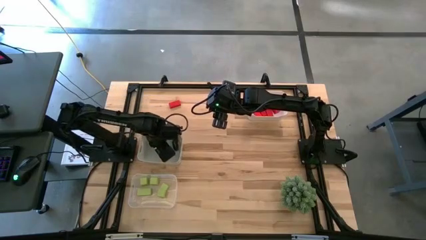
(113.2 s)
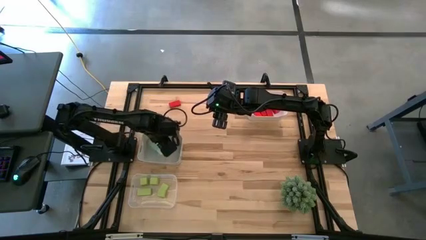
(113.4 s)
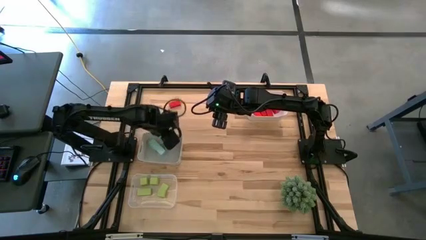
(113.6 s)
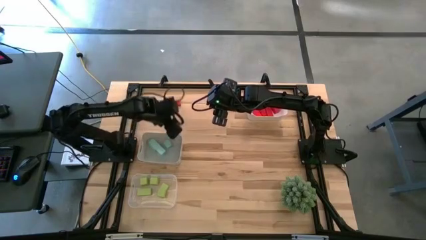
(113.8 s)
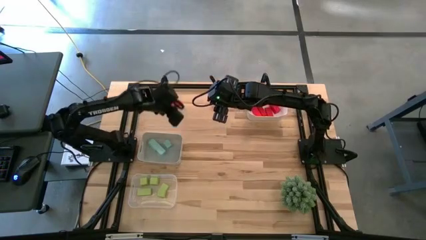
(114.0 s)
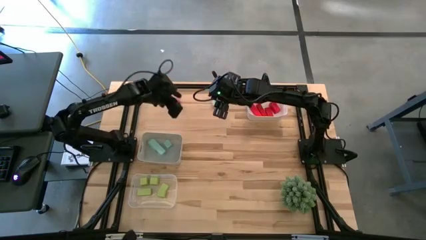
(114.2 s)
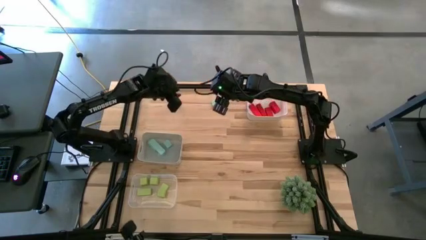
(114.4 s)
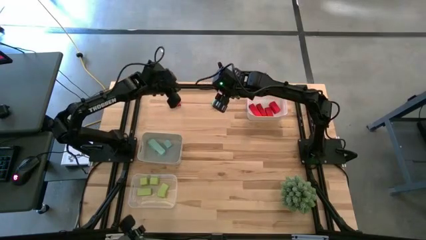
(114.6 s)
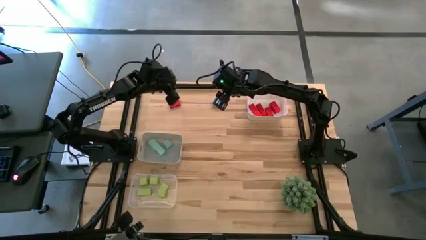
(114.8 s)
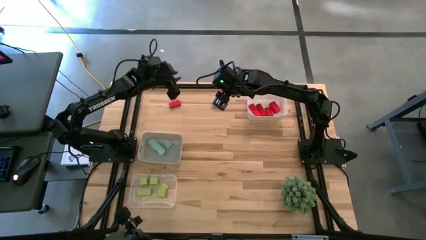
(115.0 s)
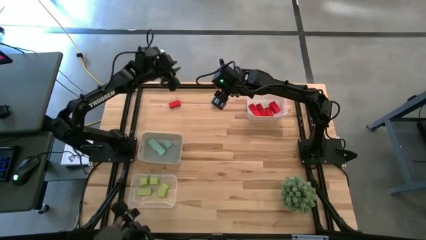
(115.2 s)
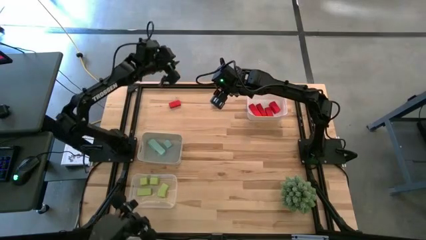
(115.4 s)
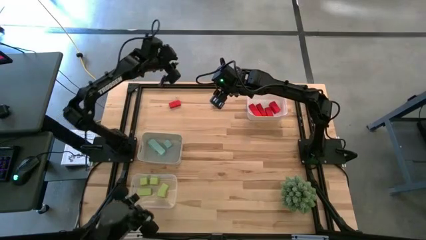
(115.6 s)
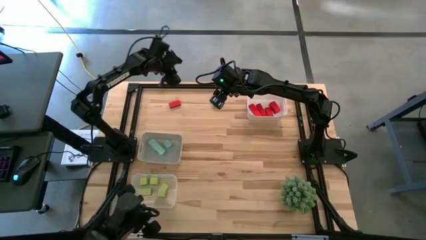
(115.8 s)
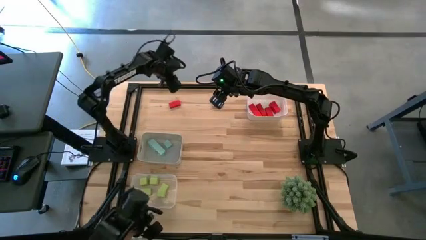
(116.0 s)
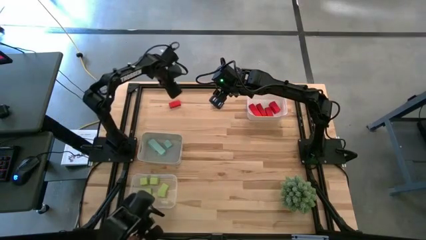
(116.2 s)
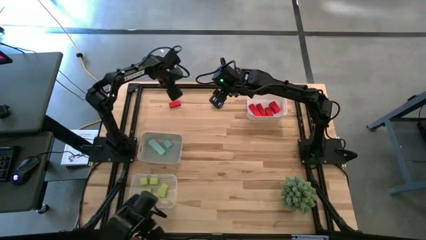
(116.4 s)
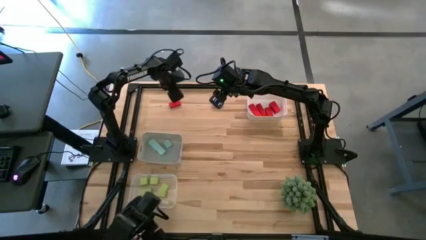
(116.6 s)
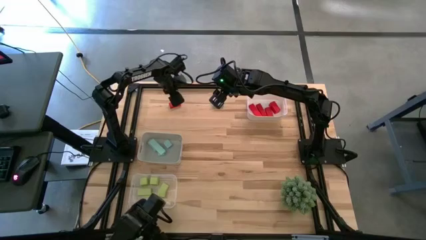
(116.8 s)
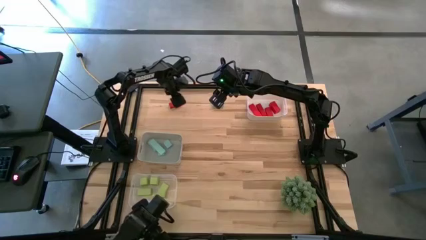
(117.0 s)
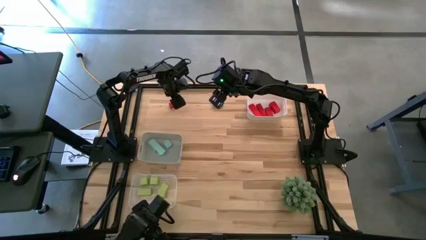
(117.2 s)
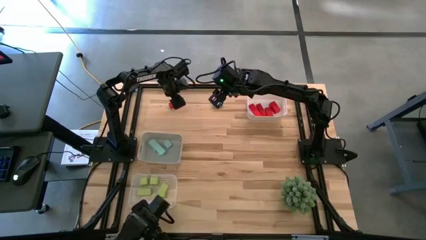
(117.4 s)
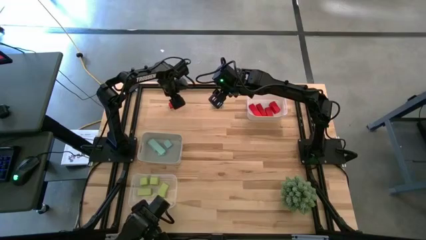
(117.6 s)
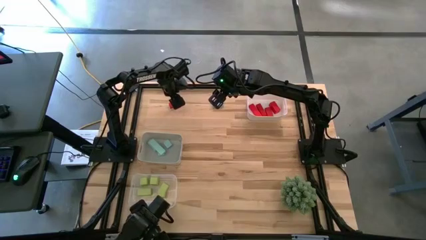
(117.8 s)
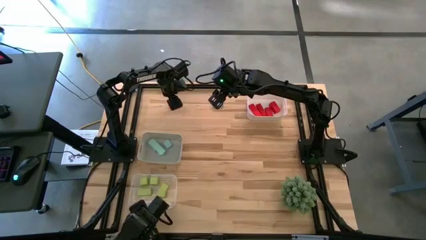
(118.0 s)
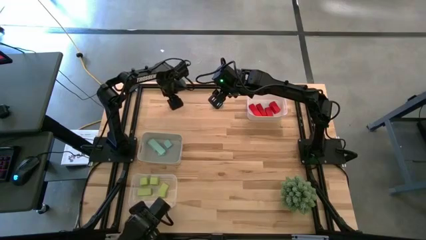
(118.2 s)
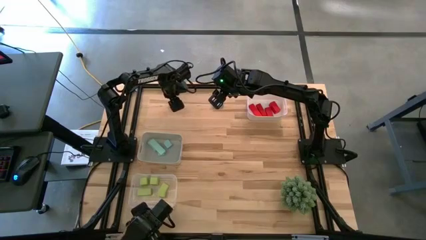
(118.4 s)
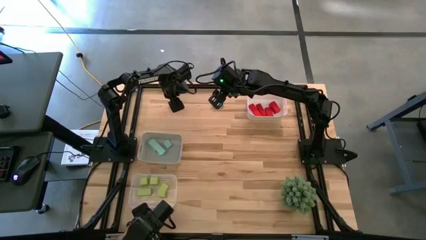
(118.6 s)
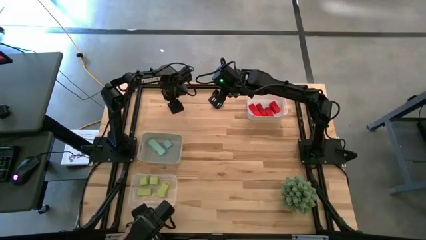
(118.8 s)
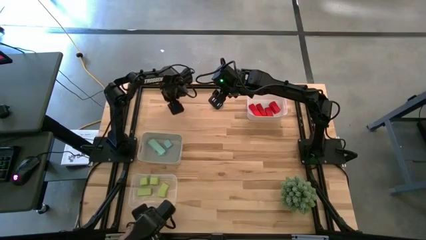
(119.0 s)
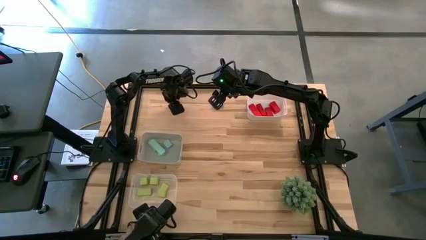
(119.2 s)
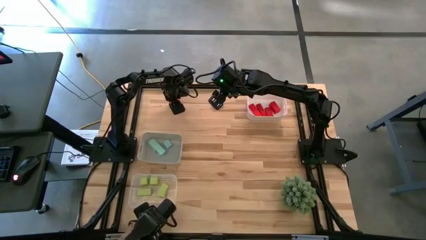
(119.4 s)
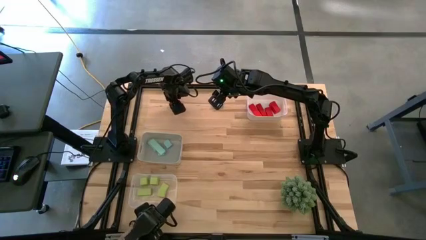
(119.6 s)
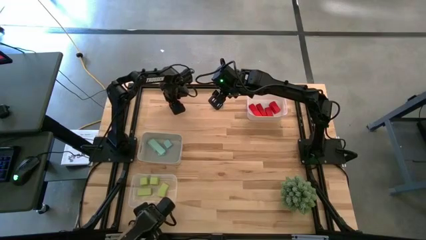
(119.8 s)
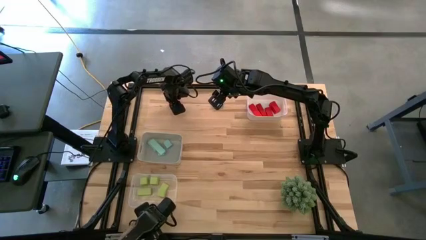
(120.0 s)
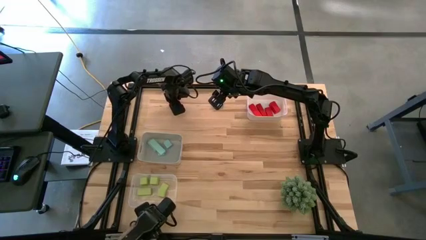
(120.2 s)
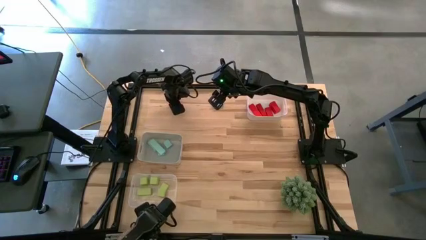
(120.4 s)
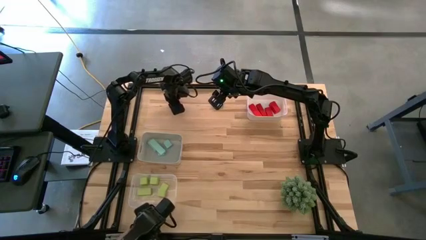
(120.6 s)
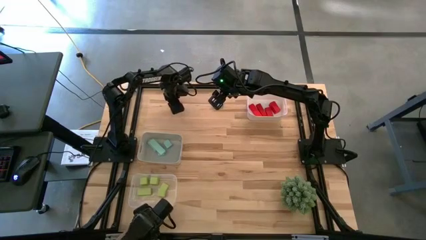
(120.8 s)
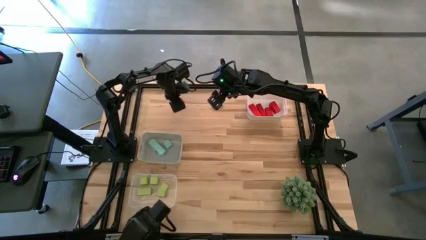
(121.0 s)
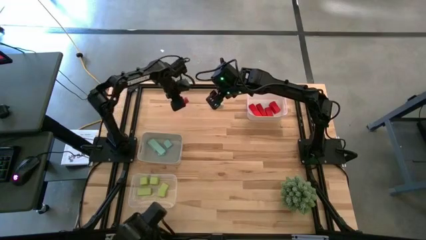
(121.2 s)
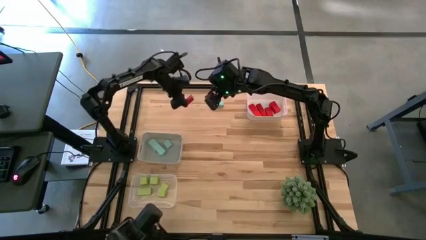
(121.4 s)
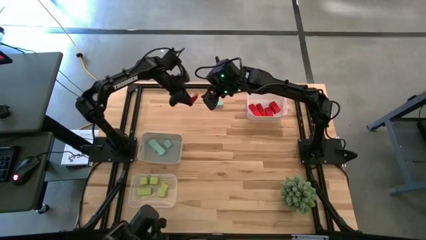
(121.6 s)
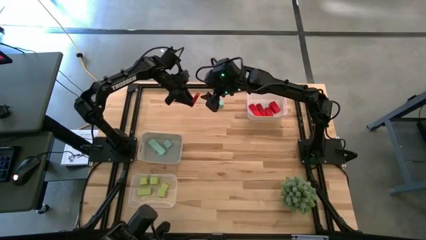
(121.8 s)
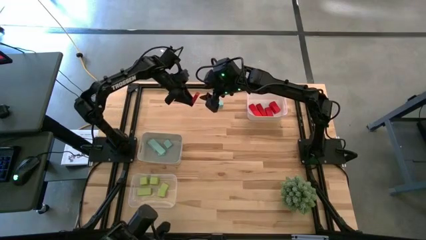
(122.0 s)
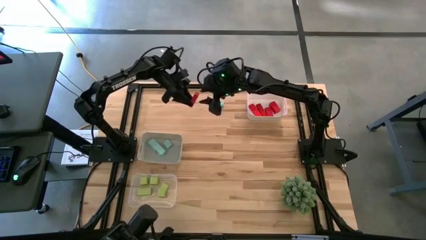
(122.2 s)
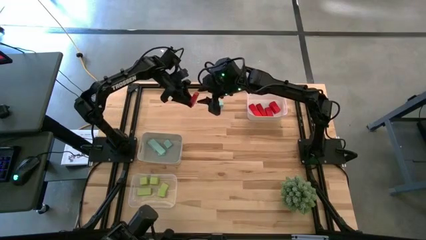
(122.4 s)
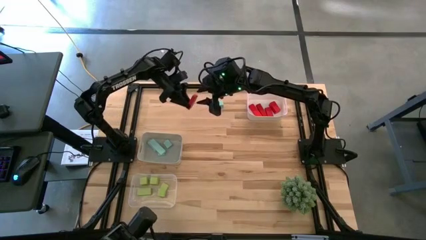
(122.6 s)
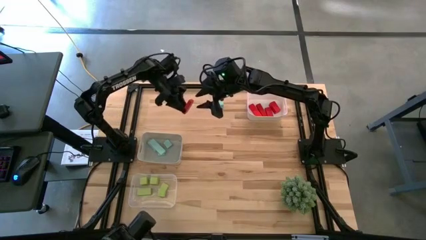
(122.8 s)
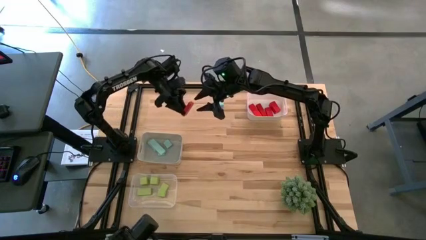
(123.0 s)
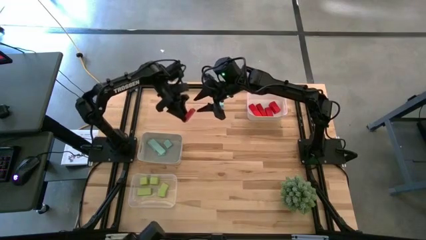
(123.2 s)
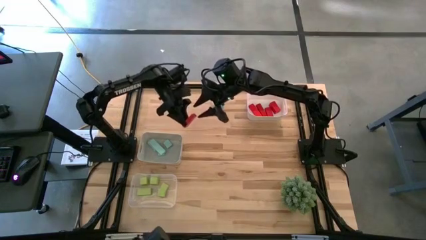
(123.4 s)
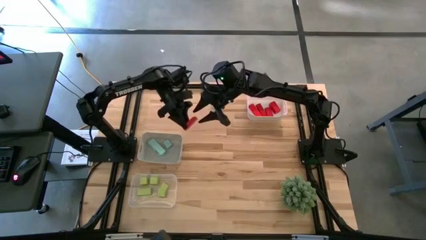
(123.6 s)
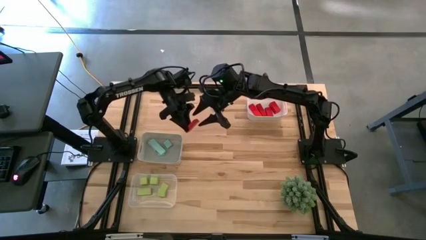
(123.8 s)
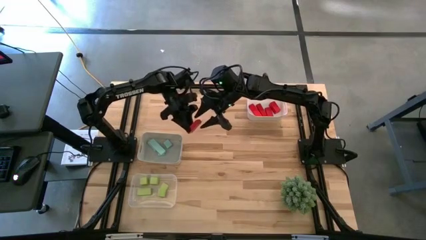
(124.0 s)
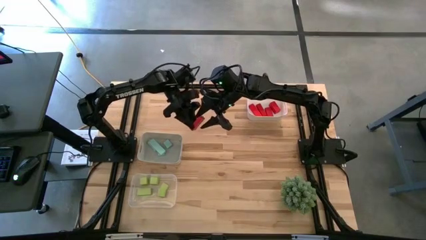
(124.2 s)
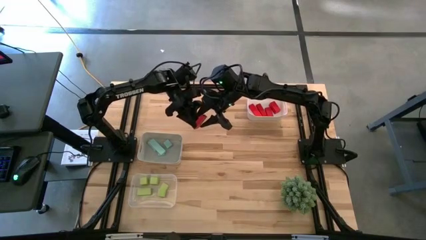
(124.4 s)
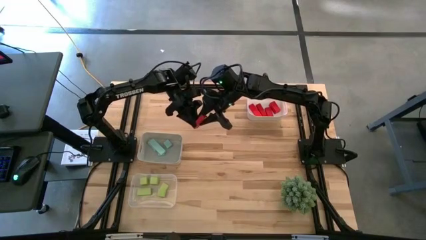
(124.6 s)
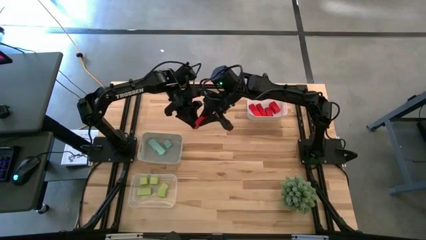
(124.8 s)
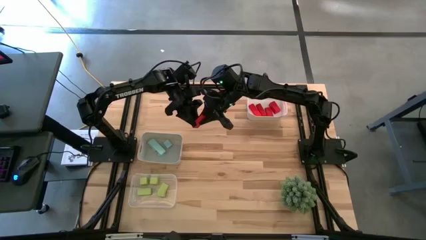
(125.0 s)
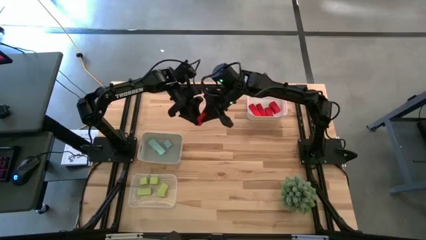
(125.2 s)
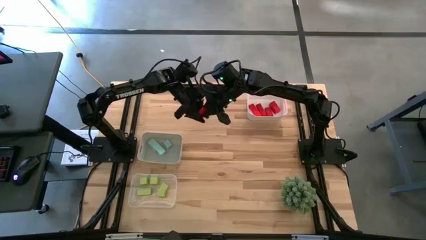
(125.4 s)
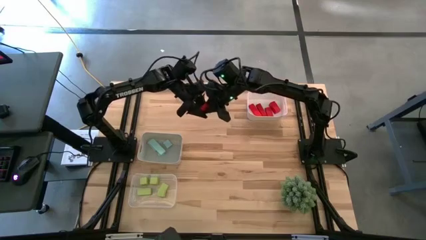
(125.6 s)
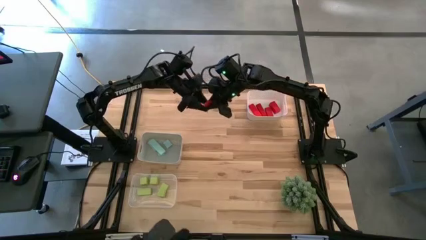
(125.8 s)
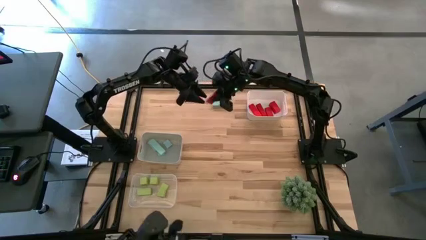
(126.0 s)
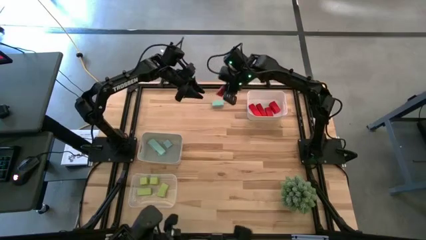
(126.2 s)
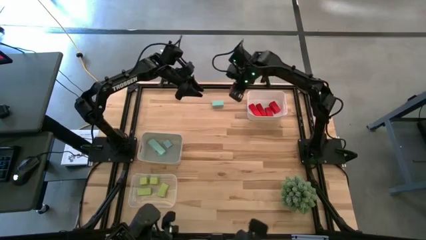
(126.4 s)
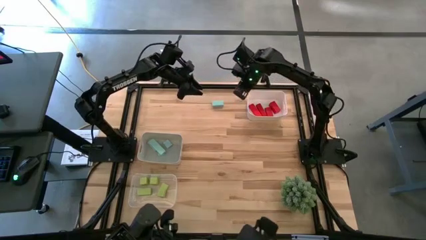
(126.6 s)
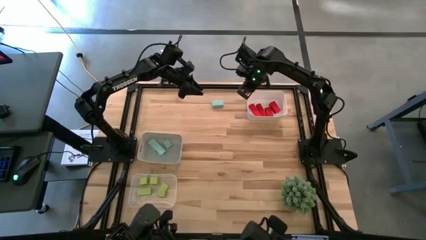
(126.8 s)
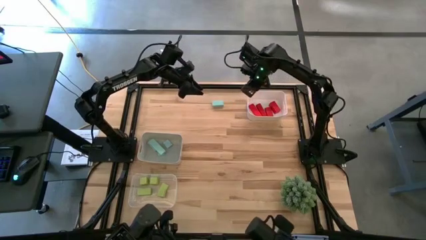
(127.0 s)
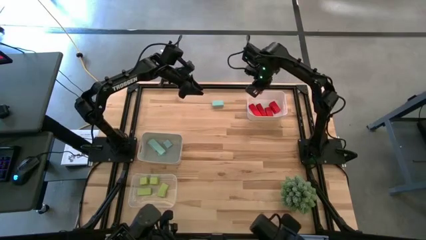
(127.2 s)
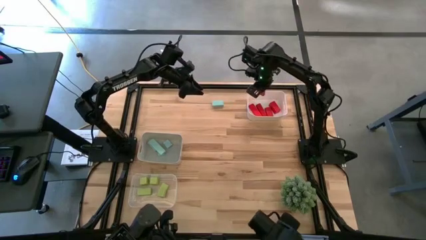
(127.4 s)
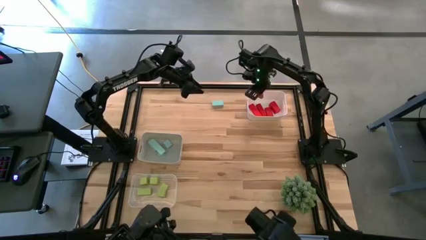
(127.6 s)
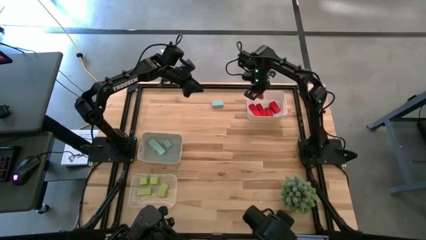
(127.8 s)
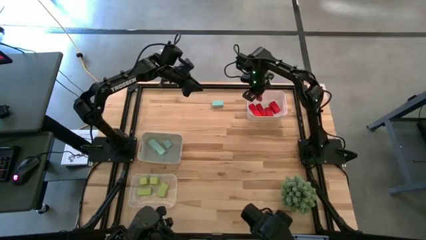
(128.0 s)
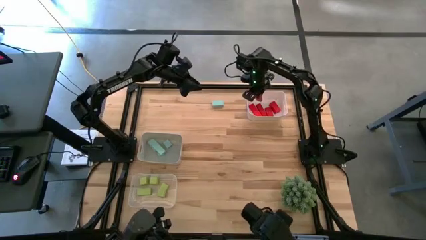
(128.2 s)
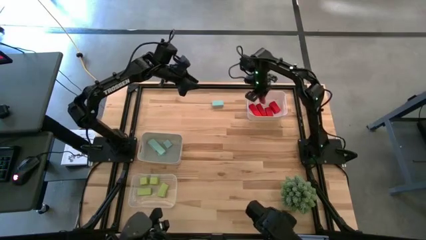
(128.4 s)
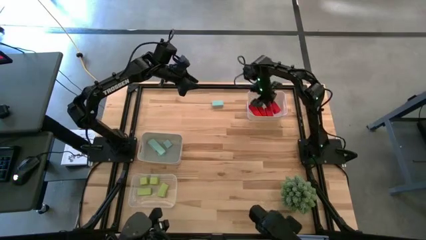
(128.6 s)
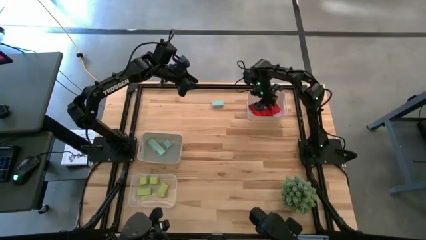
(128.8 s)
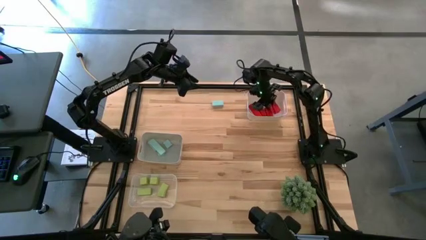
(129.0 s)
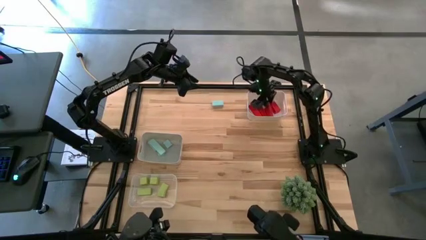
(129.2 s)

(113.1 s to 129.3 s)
Task: Sort & place blocks by color
Put the red block into the white bin
